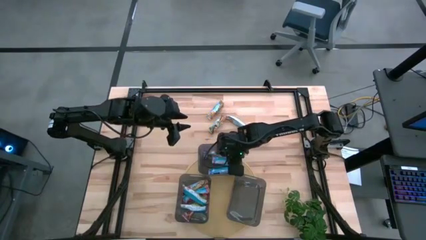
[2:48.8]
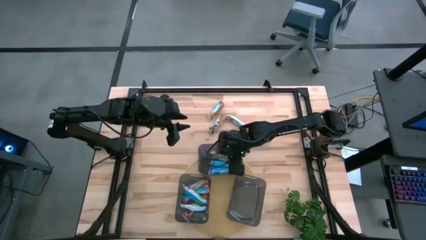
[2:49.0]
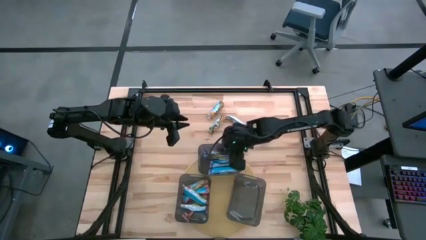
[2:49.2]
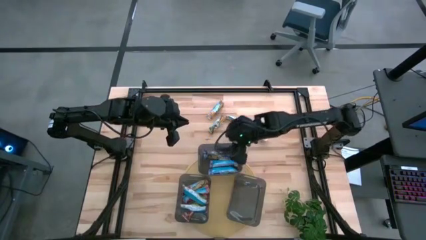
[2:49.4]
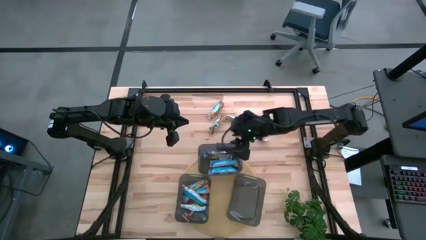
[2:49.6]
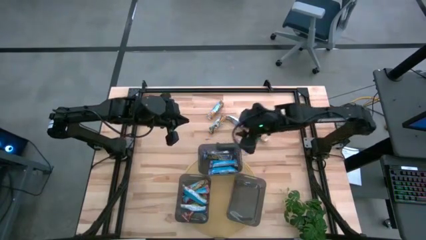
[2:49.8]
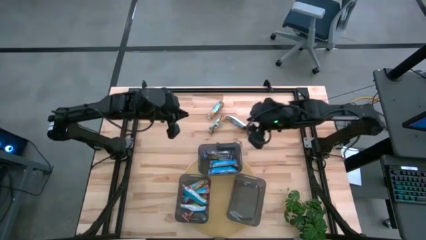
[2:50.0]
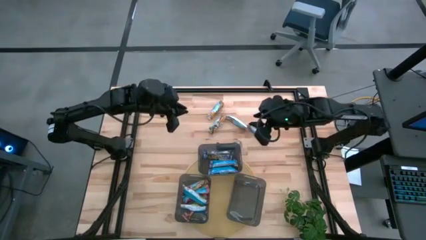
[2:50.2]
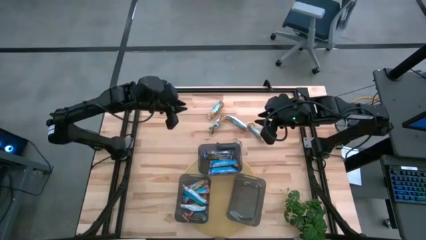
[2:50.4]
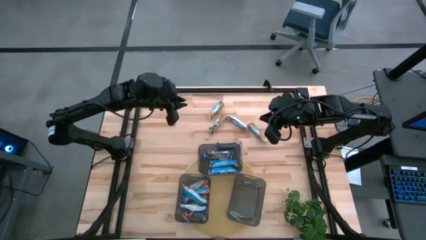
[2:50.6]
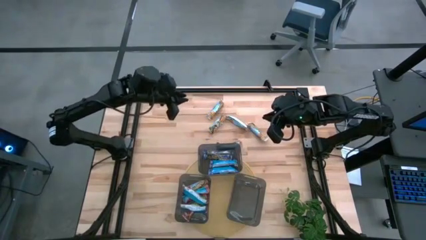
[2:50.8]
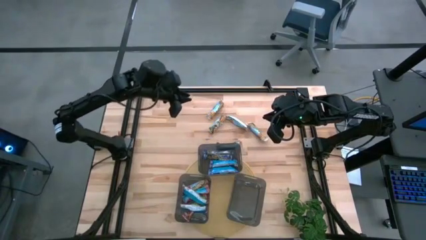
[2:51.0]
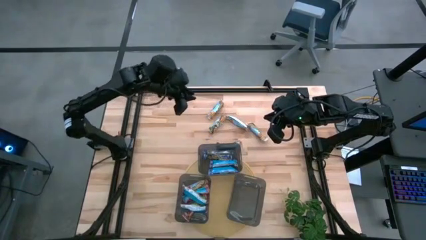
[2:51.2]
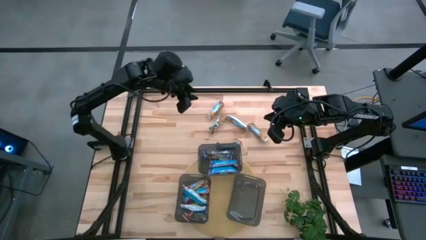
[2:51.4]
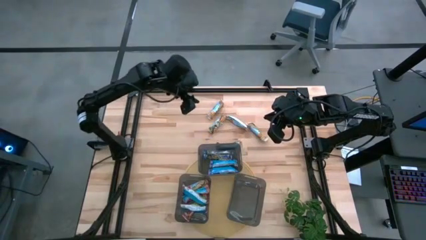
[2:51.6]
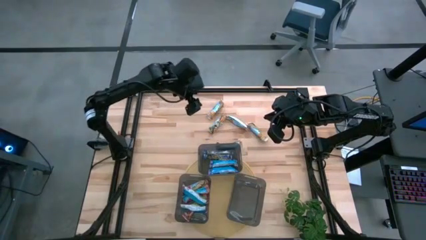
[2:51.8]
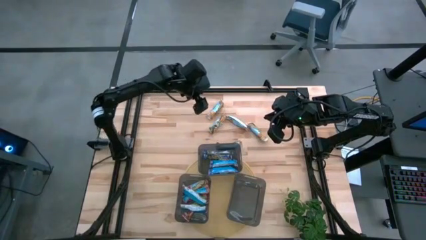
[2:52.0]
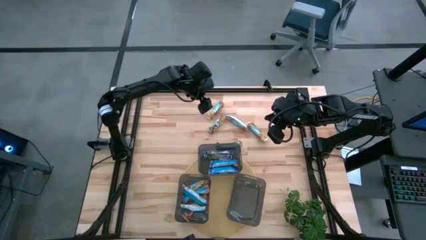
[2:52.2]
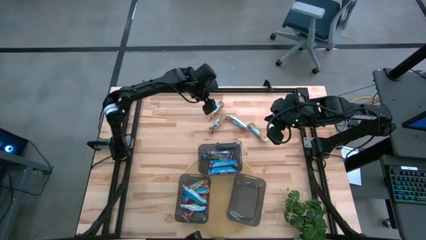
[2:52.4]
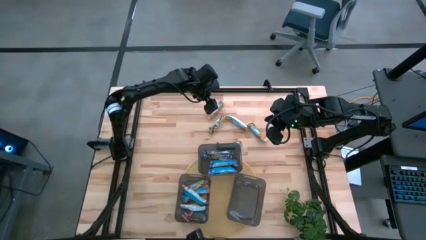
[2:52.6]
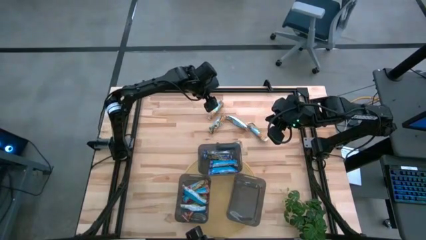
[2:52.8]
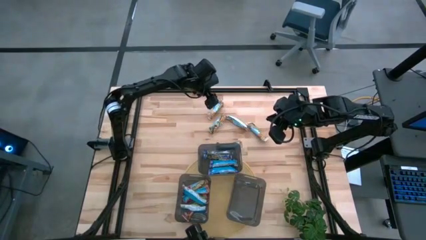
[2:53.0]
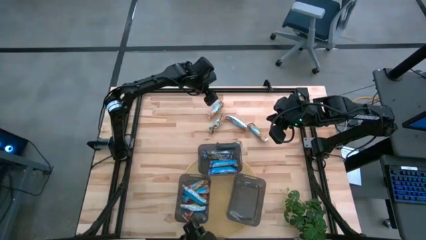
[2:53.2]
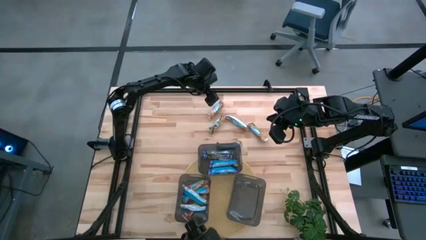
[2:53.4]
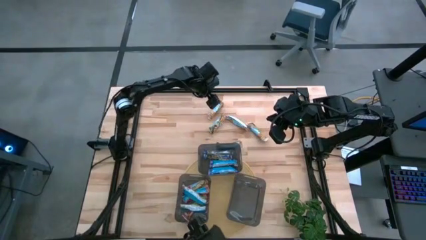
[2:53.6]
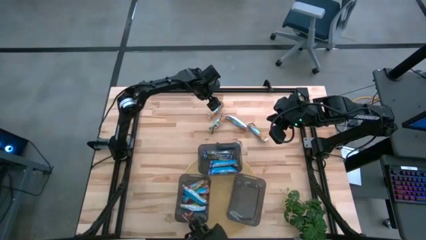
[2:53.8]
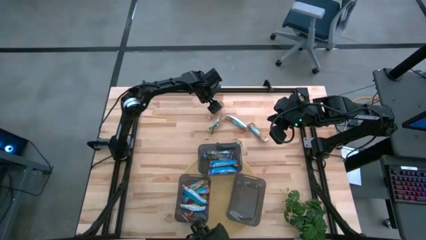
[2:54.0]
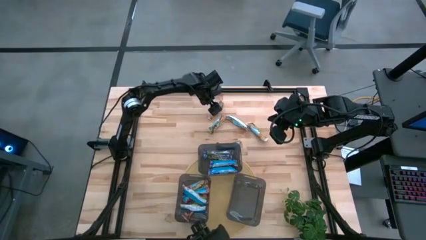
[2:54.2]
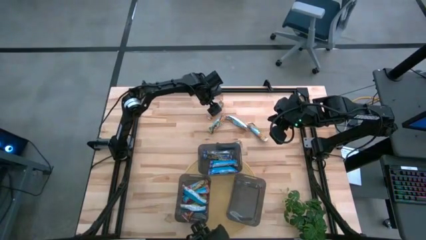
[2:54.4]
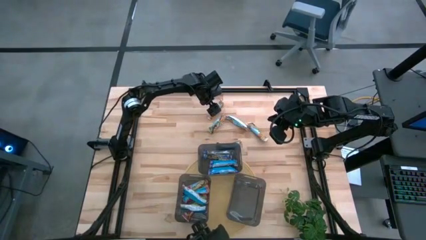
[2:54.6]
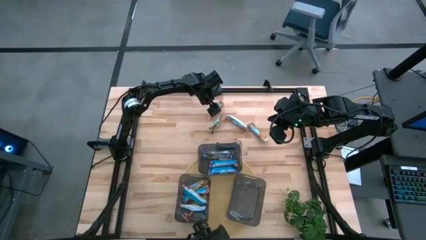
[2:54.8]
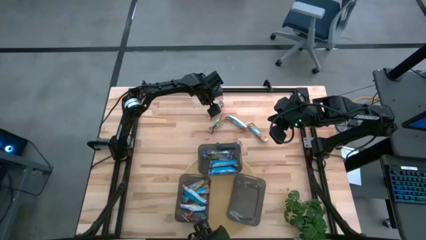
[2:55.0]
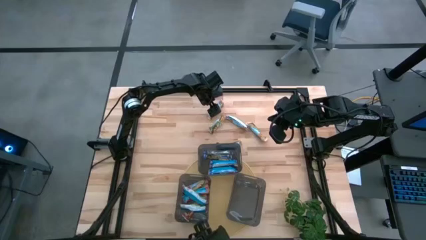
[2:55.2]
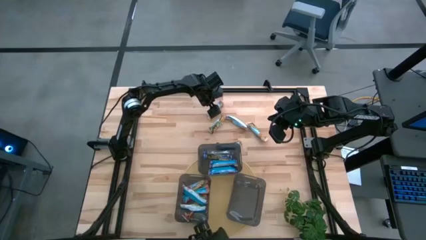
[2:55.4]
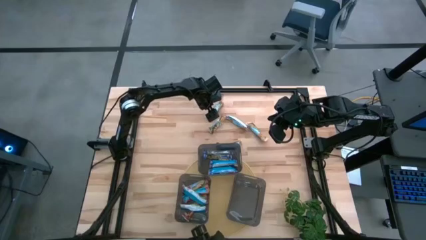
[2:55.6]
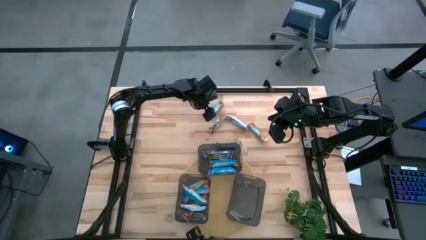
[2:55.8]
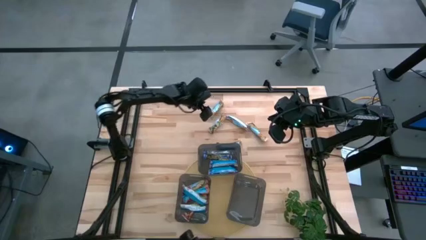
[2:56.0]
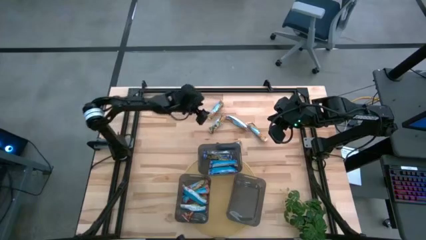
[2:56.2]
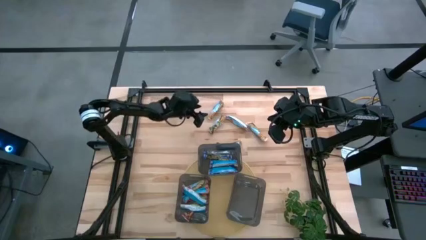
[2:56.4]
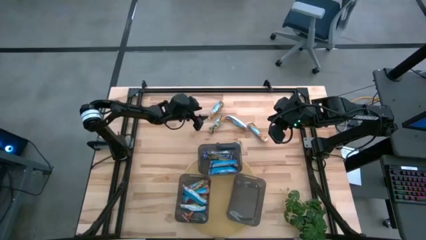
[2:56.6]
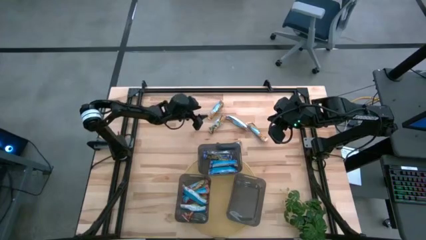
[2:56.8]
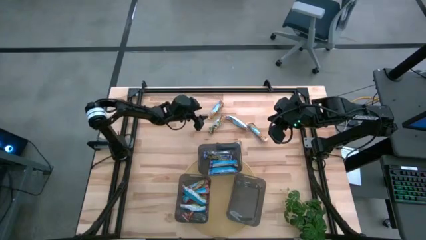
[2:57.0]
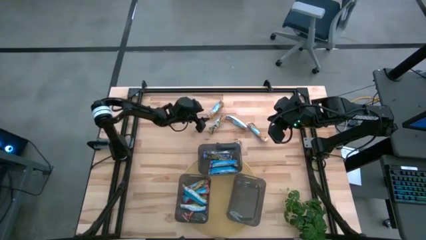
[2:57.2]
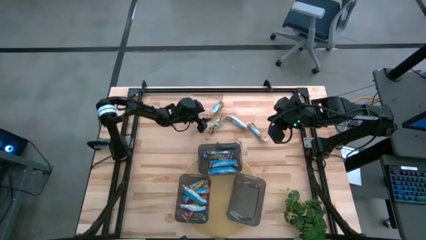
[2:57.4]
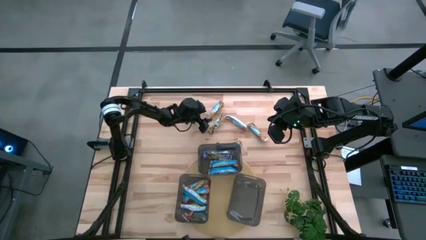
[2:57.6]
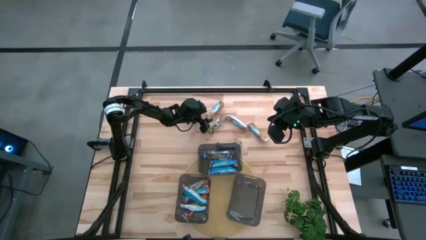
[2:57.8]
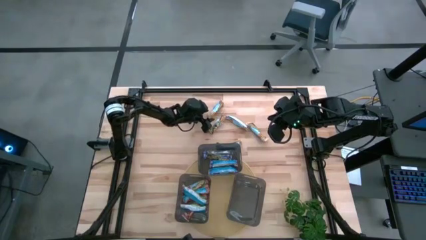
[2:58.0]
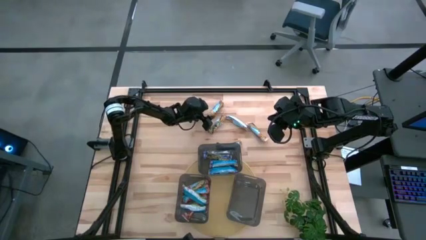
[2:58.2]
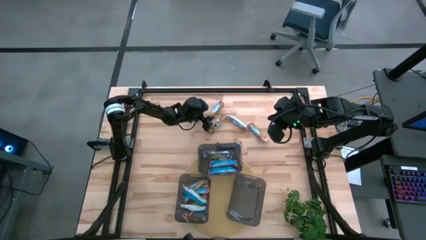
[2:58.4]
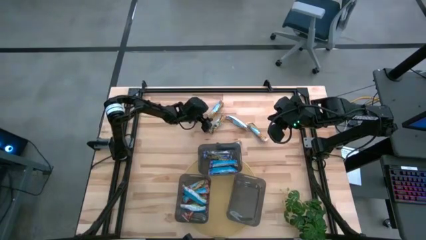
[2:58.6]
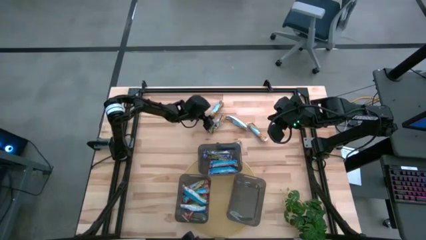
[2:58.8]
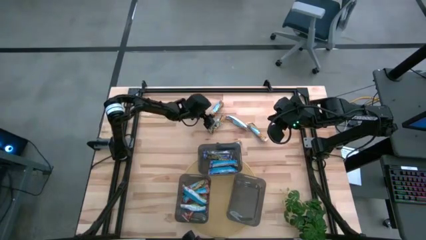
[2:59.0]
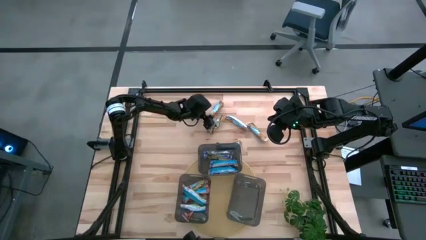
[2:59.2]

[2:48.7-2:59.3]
Task: Pick and place Granola Bars by type
Put the yellow granola bar into the bottom right black bin

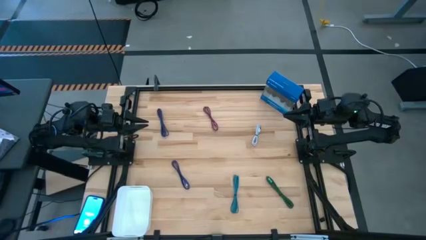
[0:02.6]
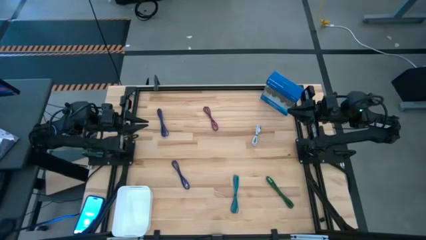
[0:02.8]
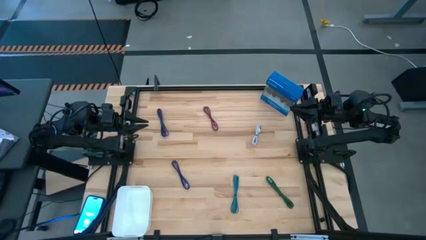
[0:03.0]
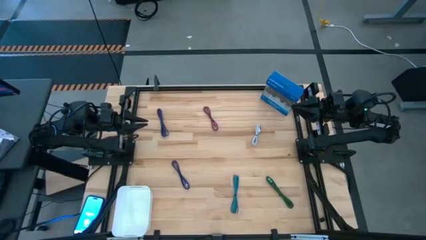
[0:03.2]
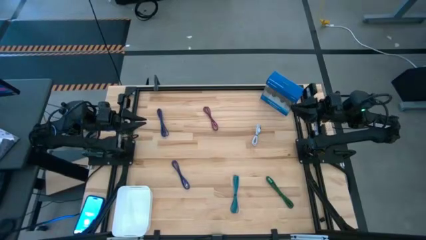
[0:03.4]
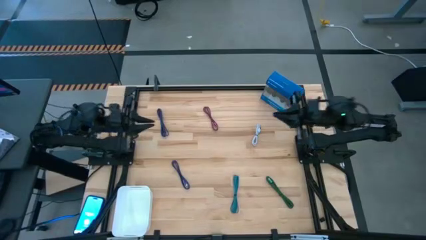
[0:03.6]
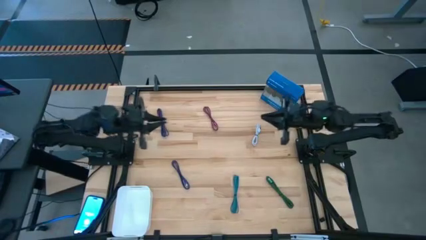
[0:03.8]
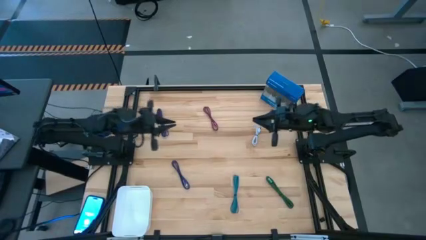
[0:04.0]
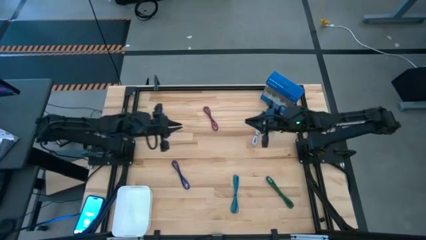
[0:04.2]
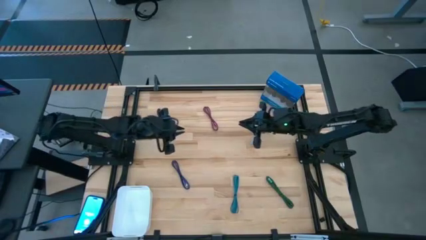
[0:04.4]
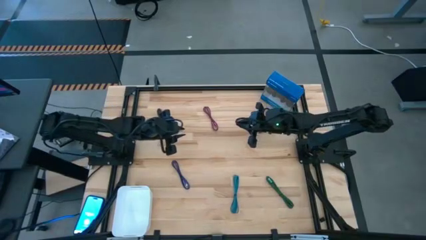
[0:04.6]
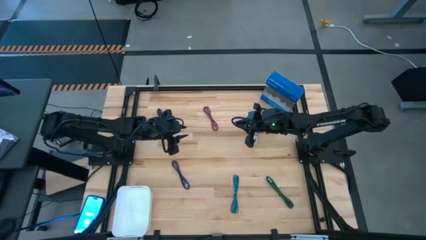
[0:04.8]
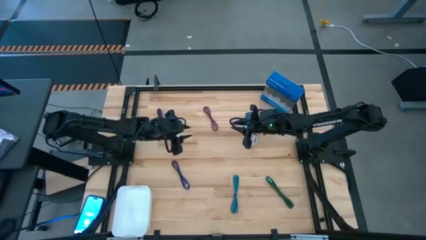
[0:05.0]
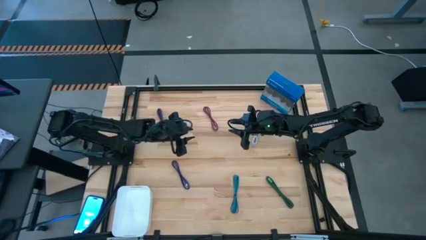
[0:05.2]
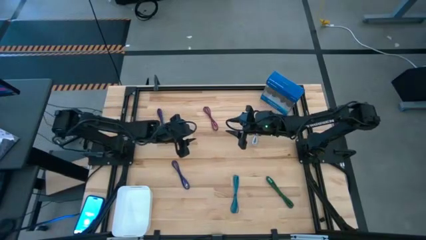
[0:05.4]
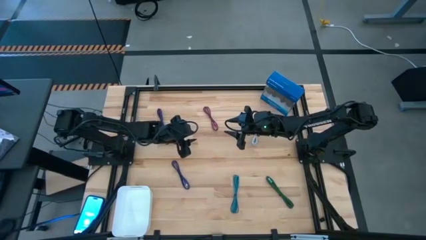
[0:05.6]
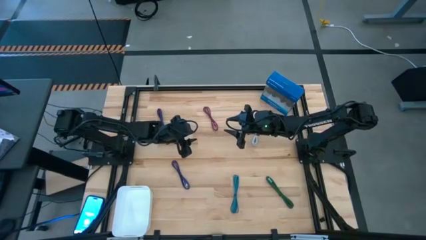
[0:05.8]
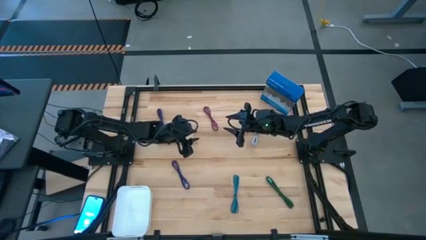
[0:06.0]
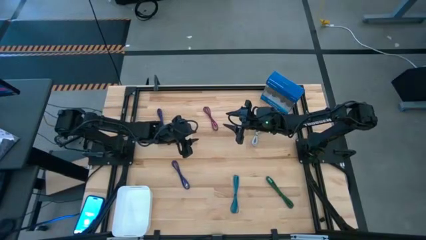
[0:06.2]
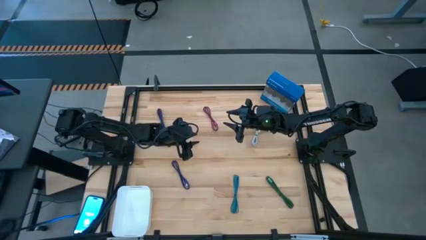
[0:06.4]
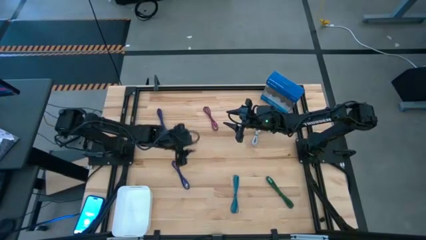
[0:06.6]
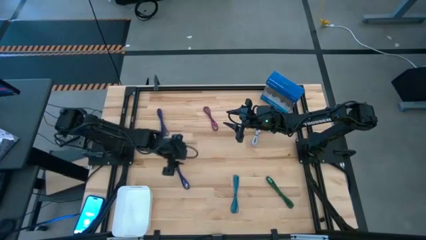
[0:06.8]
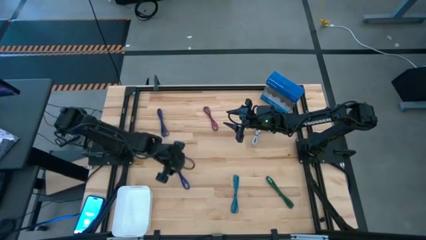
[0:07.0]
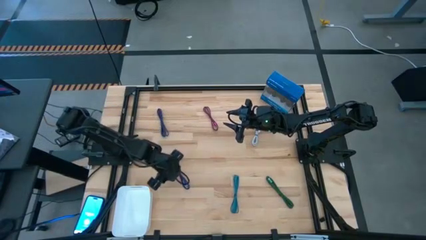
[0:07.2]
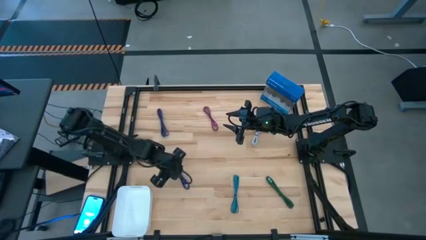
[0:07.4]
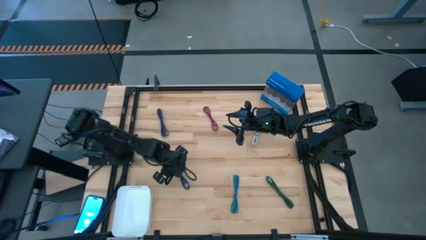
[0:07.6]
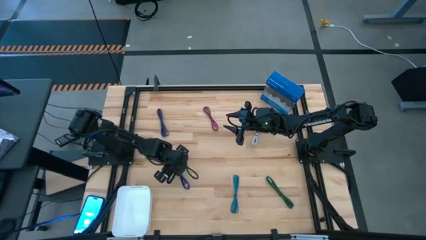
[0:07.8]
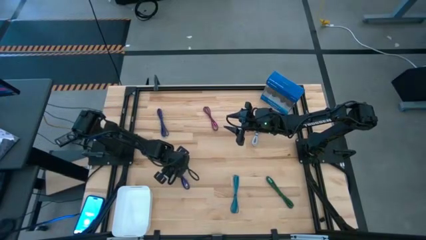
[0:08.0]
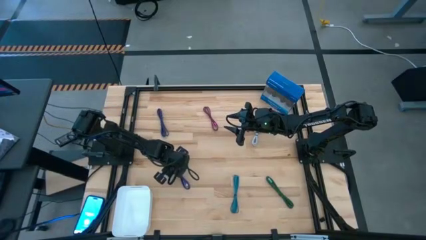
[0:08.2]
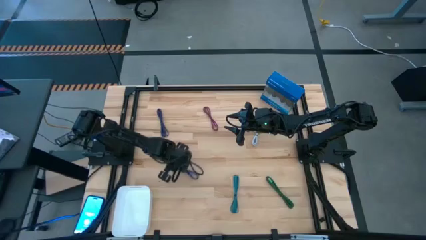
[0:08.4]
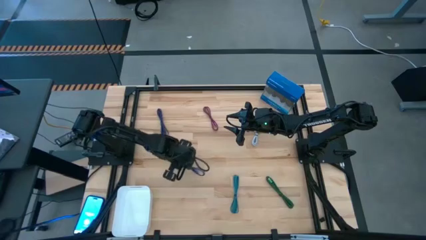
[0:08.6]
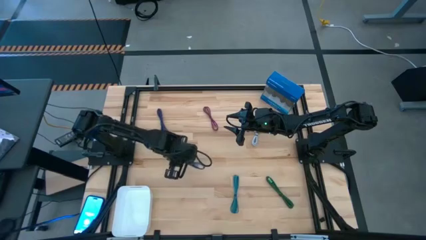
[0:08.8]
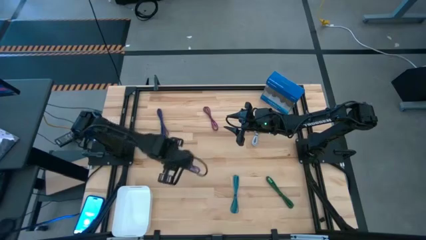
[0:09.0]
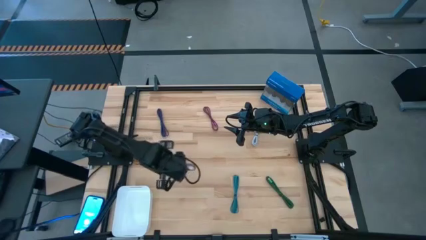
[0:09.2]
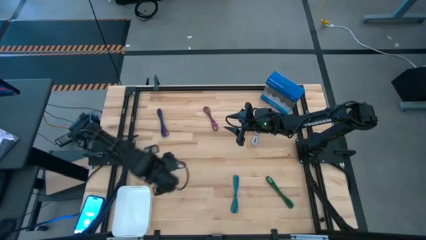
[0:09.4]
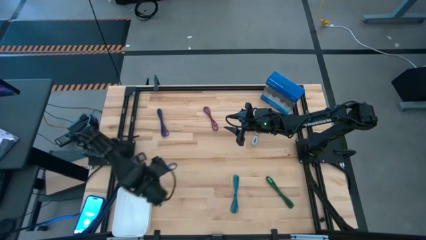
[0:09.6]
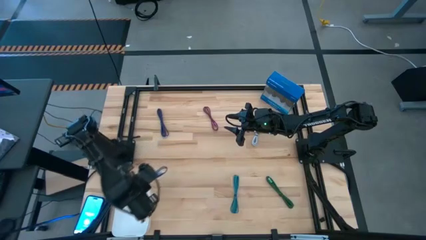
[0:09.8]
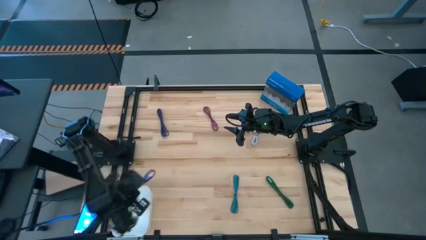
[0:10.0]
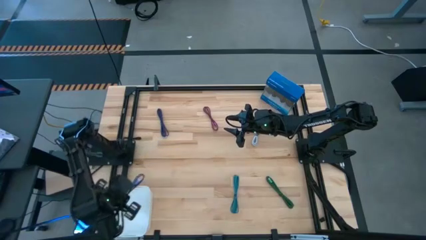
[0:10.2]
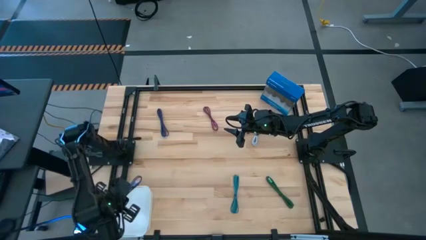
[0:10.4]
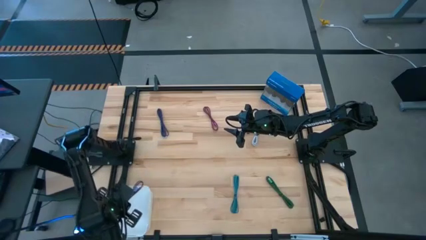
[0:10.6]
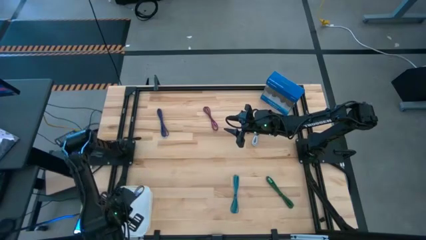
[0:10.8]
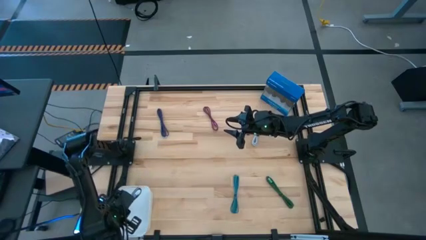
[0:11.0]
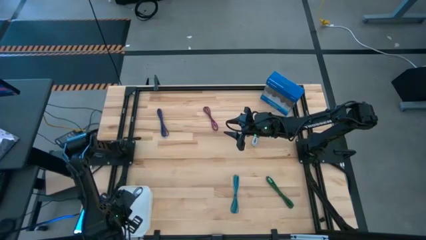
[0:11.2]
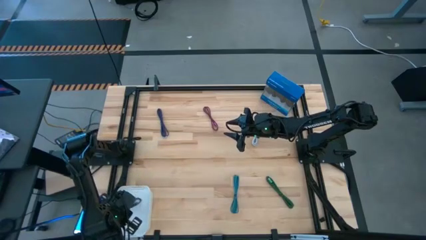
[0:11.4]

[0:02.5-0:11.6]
Task: Pick and place USB-C Cables
Put the bottom dark blue charger cable into the white bin
